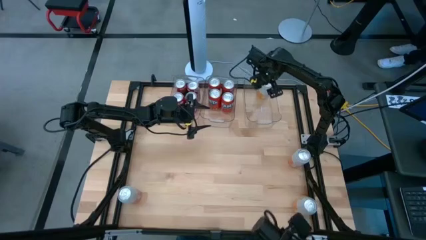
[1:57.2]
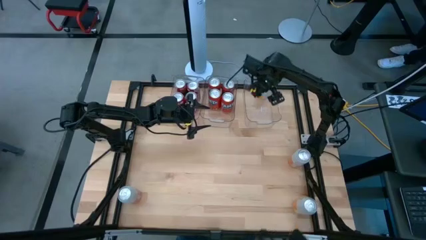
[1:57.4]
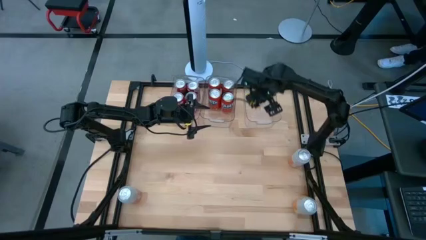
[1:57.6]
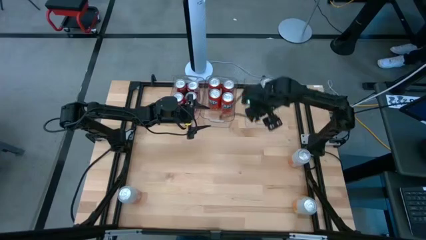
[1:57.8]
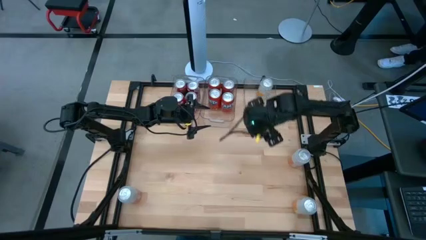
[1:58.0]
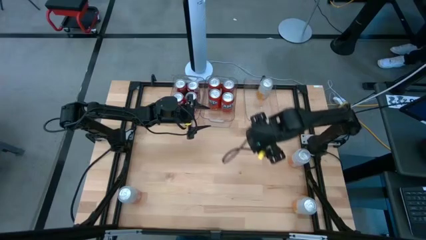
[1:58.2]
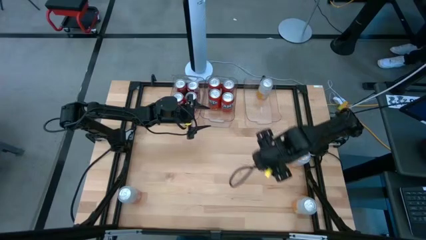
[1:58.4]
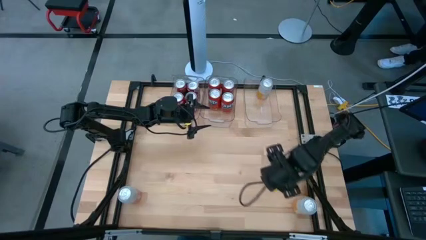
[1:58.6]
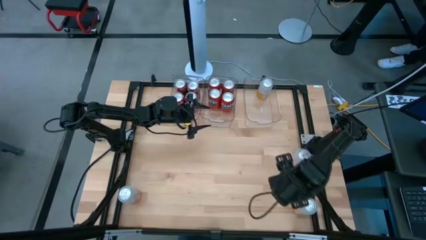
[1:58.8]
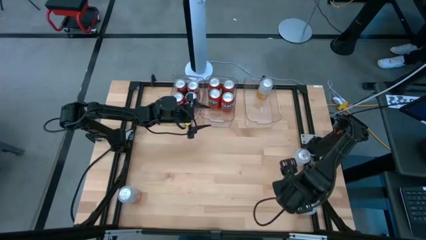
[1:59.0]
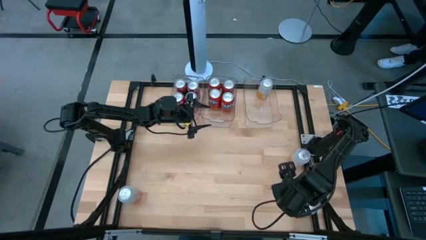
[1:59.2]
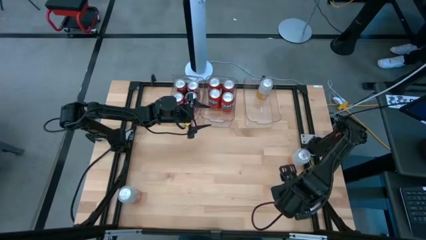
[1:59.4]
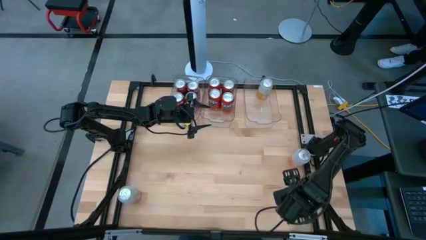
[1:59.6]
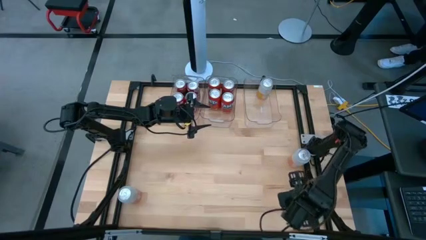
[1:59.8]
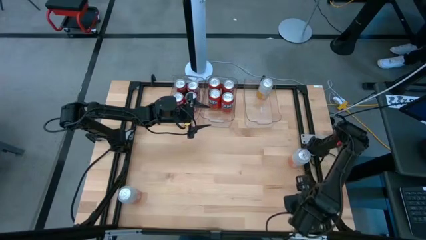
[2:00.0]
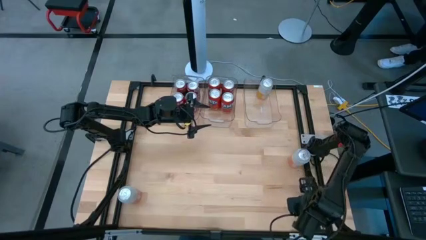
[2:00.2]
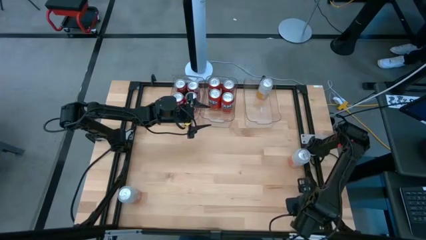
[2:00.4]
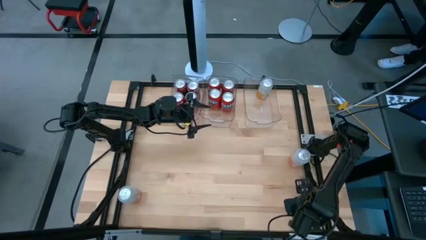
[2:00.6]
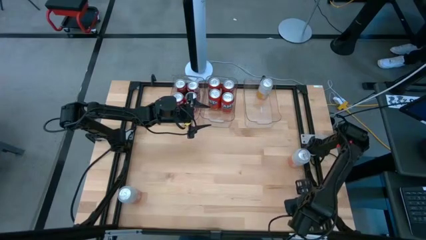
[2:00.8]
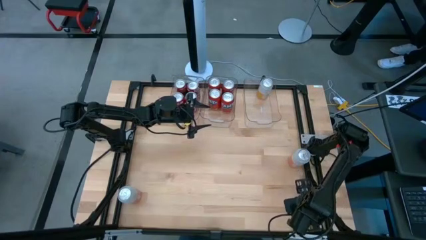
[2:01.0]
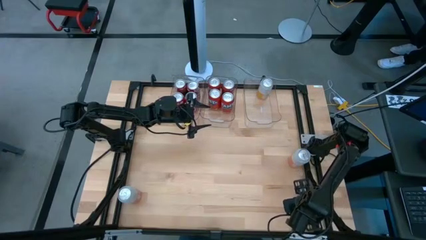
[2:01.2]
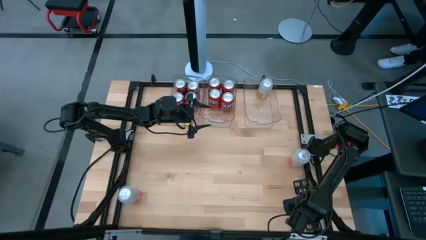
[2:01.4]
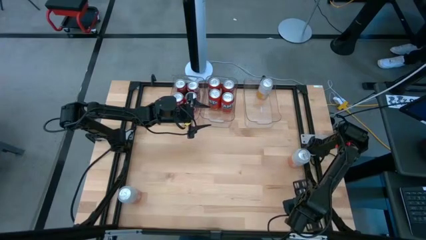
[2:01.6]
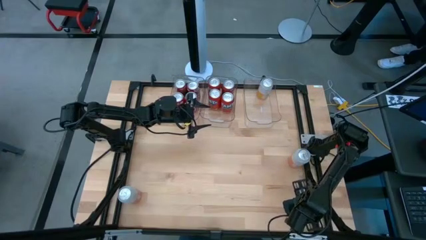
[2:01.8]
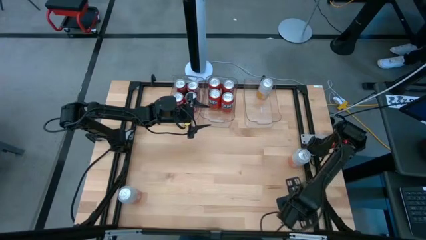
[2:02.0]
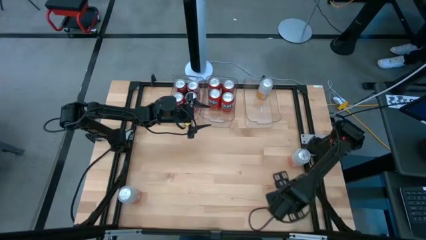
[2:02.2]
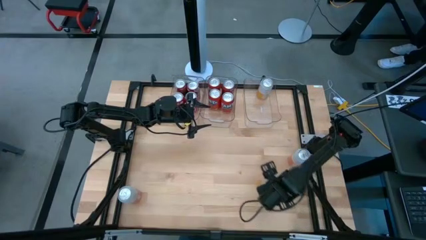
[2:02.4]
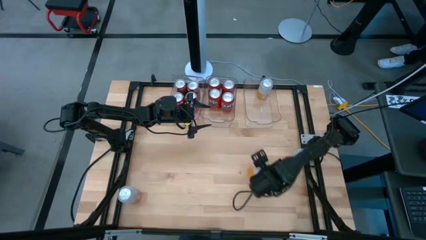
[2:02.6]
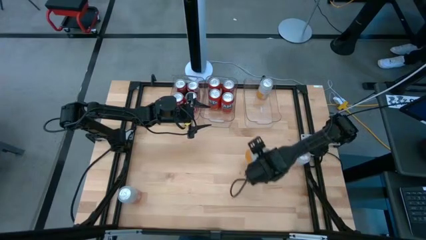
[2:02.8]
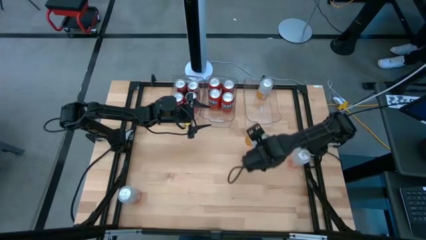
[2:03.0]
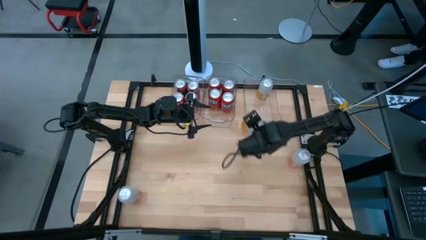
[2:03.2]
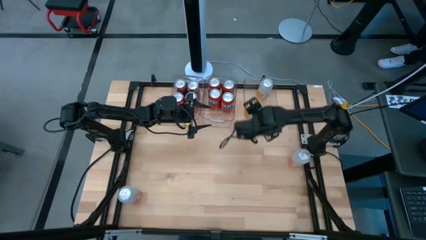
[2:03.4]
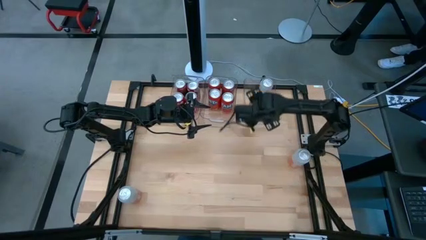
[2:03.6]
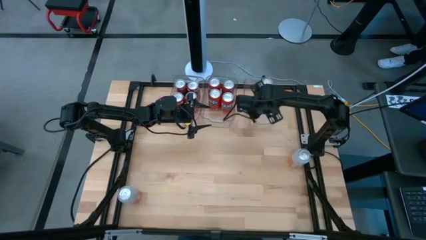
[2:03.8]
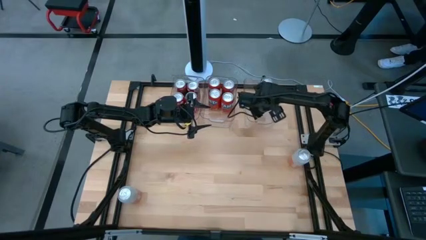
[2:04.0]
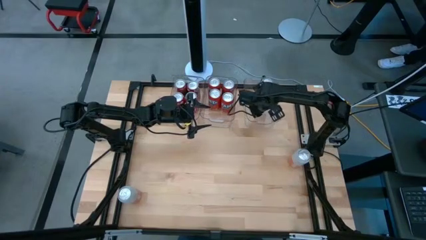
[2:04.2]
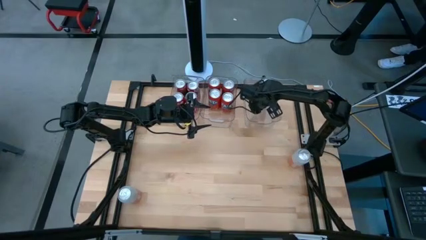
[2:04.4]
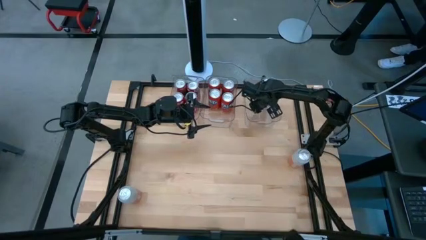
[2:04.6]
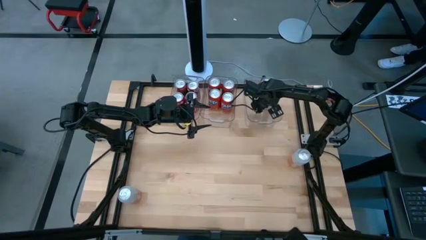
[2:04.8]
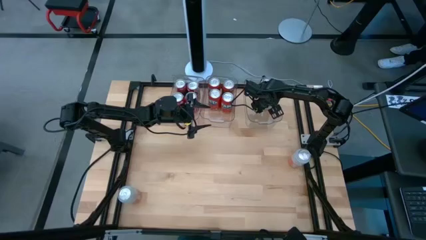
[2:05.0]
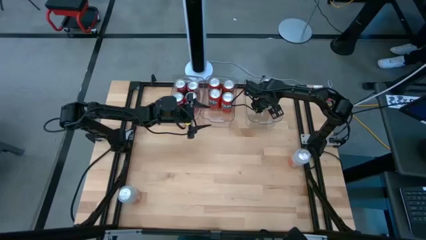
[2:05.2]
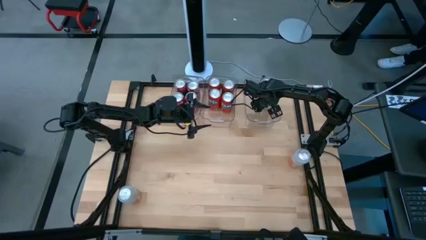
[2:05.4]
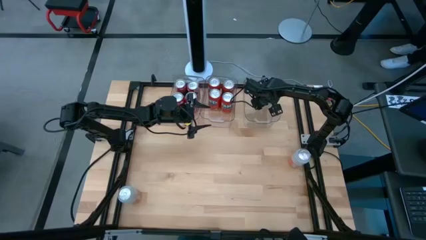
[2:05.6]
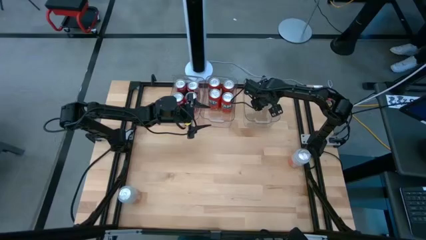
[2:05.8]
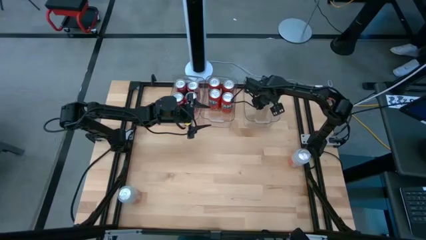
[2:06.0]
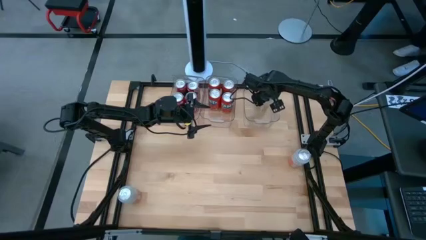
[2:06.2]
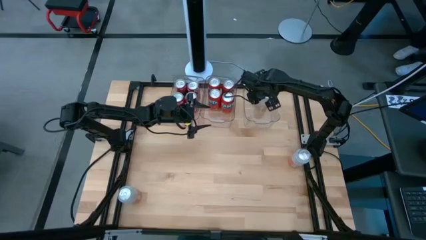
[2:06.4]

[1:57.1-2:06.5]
Task: Sort soda cans
Put the bottom right white soda can into the right transparent bin

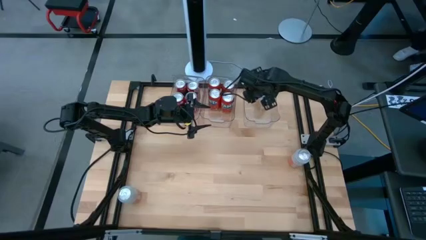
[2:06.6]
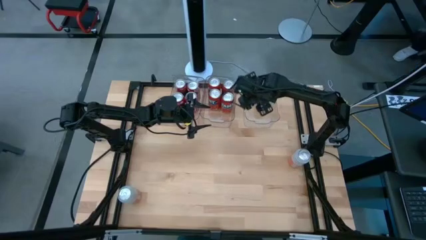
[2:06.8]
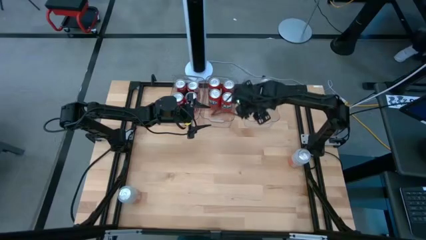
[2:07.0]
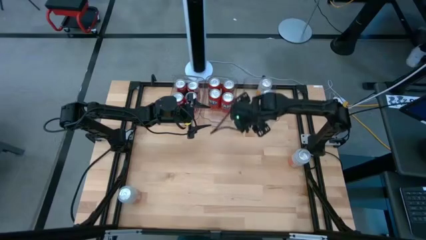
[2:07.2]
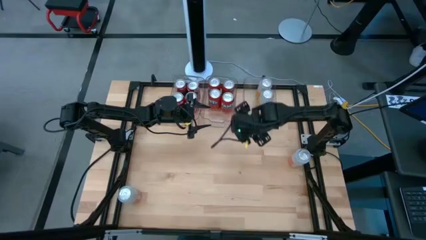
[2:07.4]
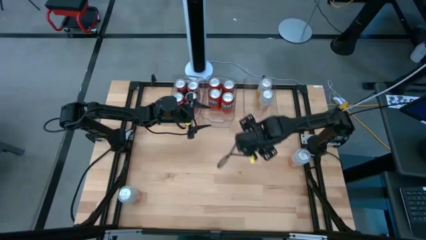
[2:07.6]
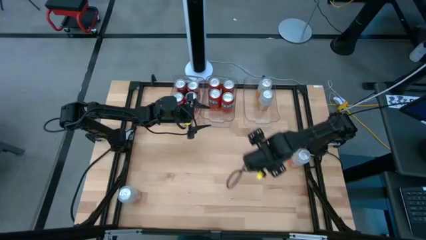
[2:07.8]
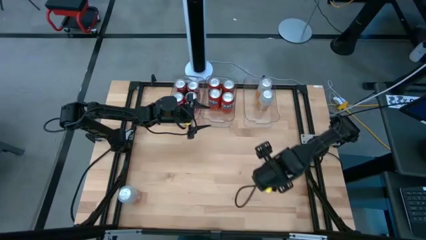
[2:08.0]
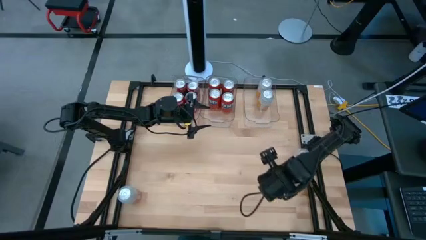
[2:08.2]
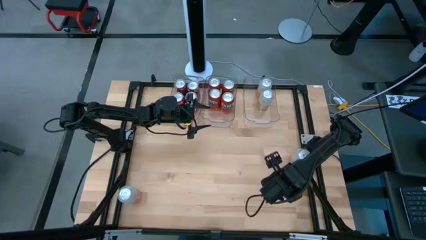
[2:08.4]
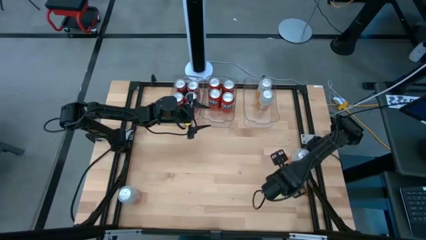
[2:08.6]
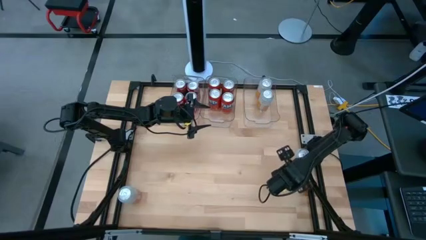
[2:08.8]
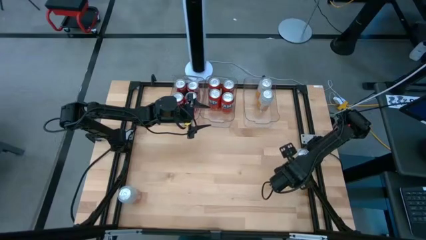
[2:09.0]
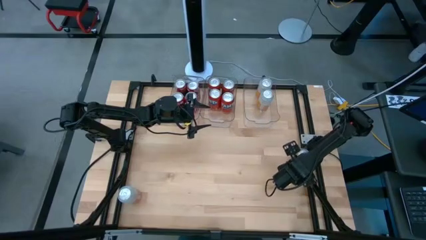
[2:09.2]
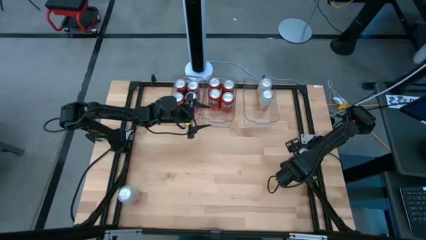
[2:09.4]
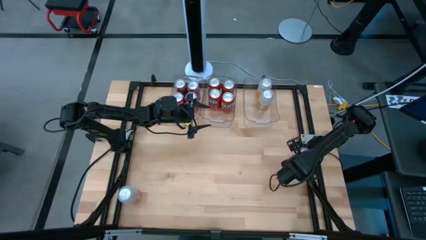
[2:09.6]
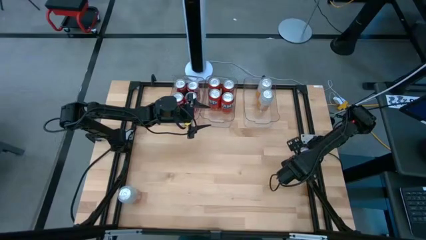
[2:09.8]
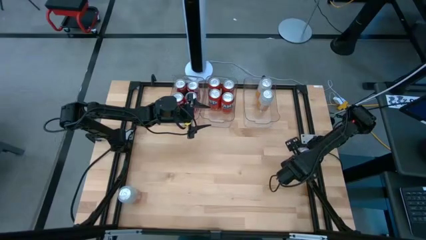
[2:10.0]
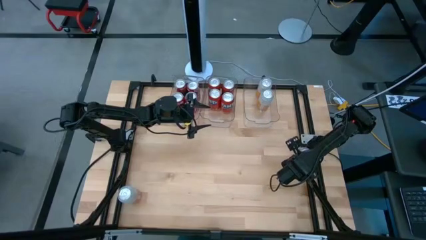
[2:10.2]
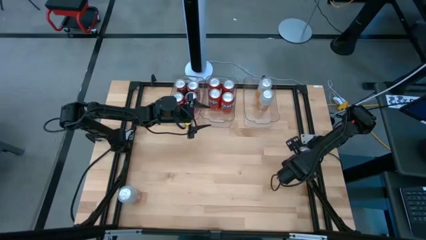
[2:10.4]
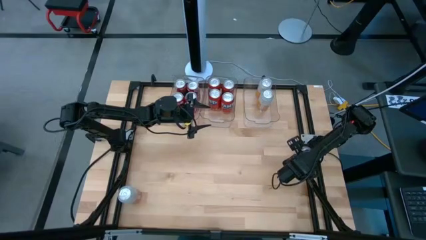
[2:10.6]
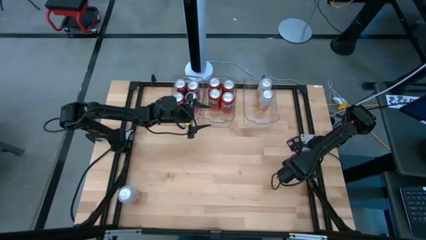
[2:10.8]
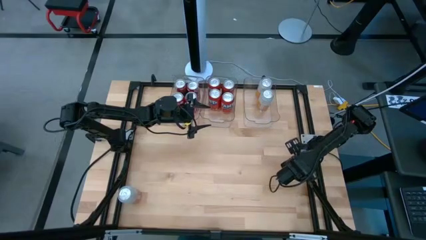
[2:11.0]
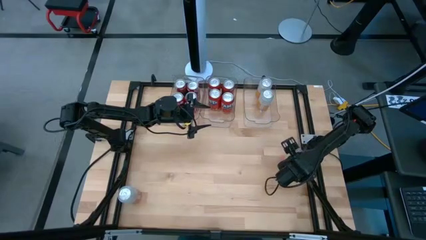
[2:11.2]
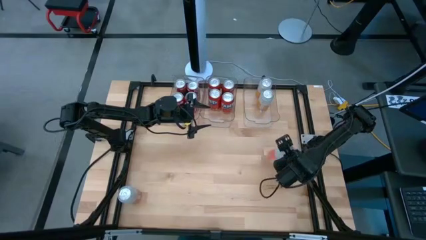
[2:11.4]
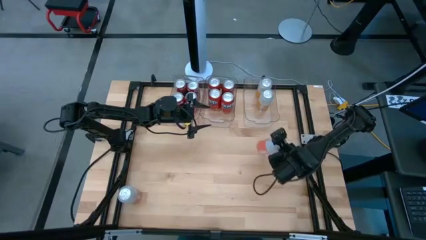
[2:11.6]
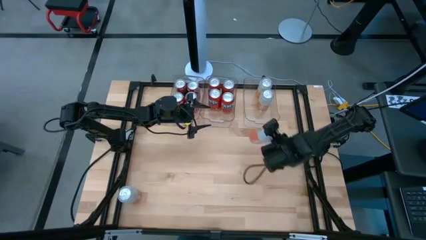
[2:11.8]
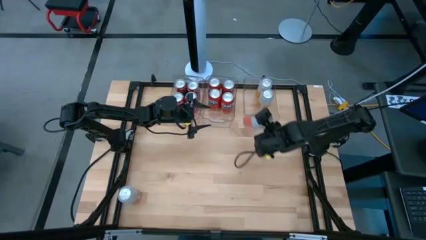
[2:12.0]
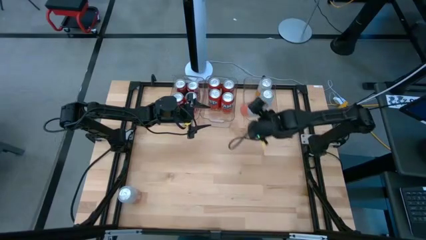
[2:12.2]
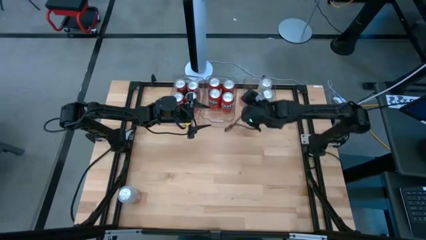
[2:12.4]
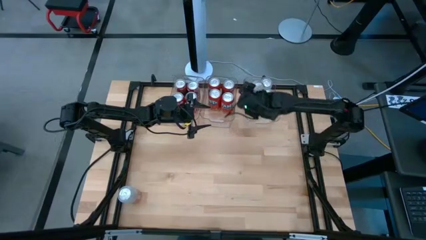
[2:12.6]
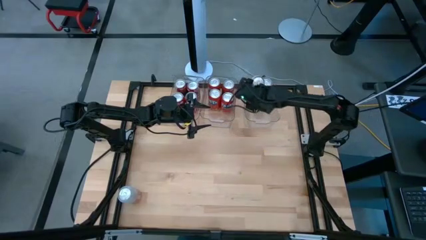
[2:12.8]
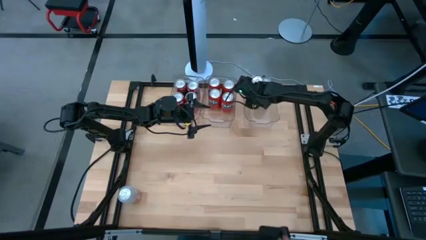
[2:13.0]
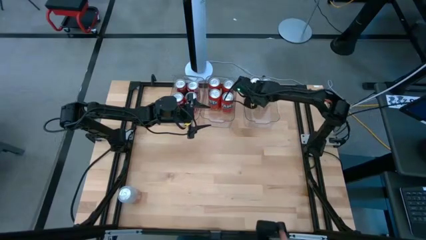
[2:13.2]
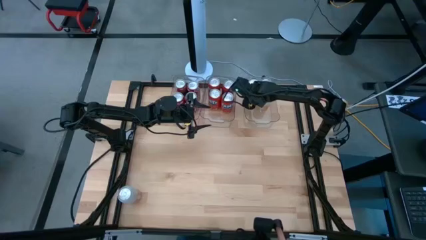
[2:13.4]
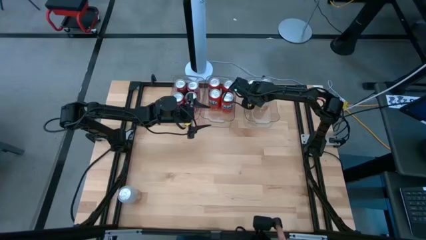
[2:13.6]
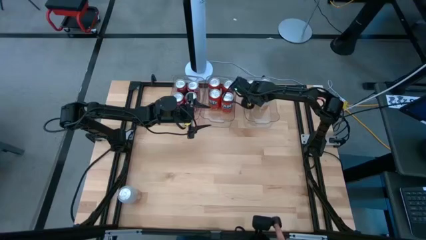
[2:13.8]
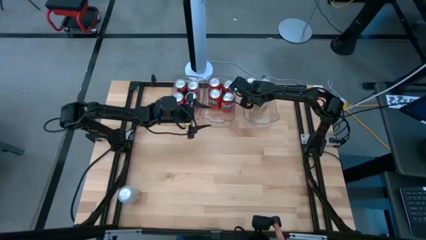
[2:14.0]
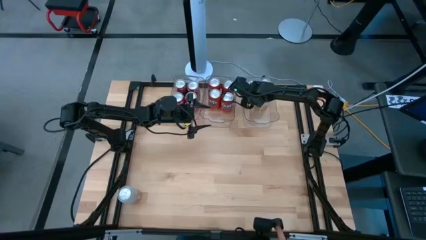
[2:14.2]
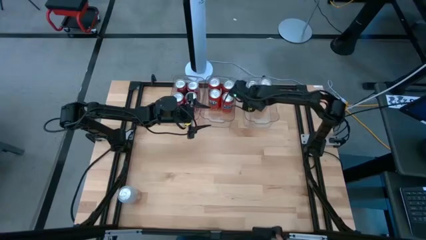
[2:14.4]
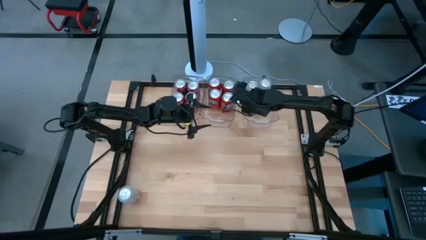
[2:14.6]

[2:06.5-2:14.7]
Put the right white soda can into the right transparent bin
